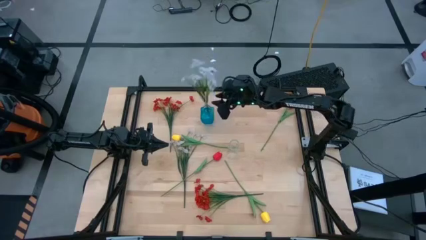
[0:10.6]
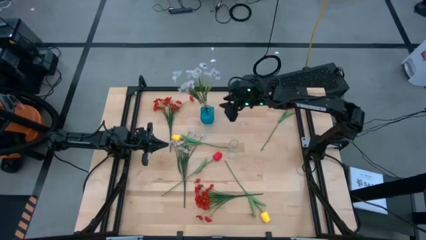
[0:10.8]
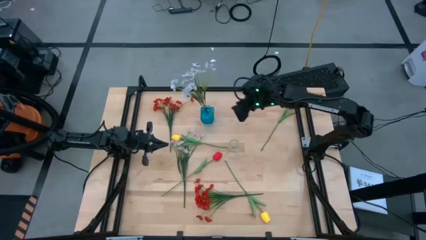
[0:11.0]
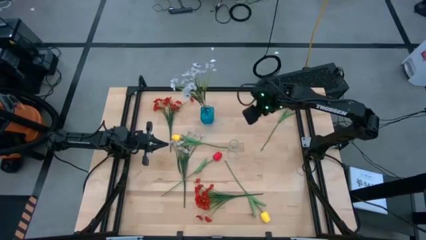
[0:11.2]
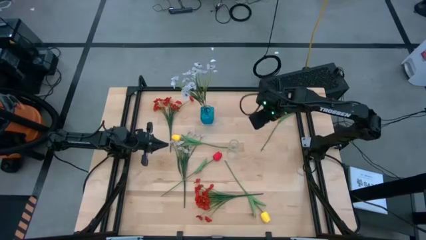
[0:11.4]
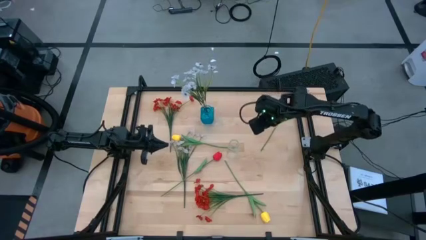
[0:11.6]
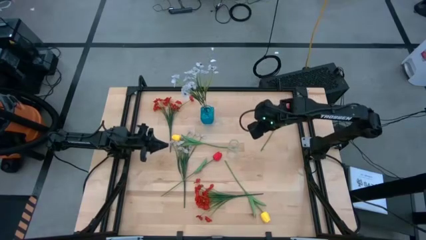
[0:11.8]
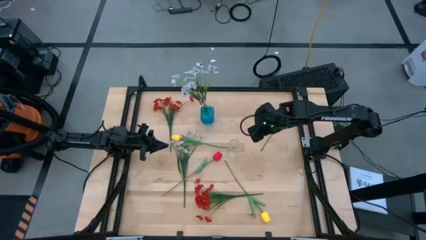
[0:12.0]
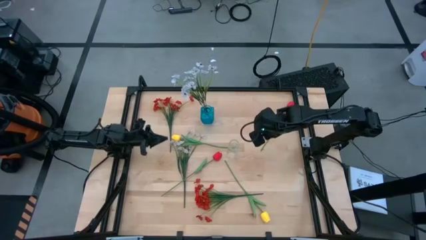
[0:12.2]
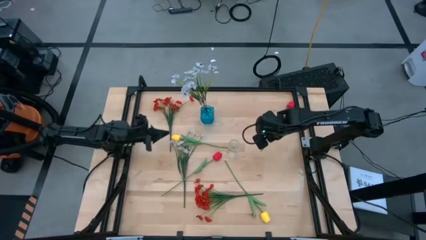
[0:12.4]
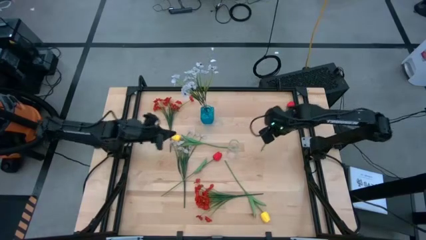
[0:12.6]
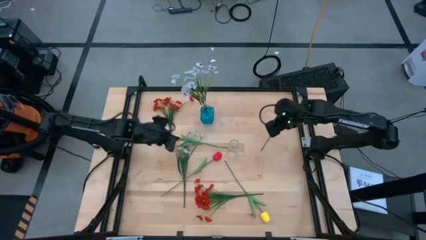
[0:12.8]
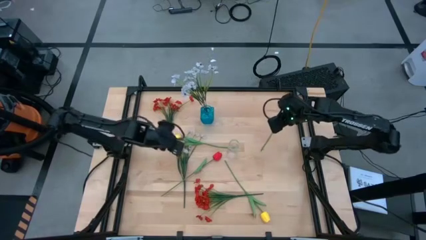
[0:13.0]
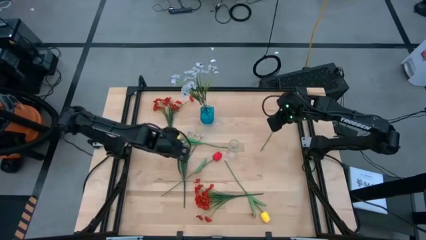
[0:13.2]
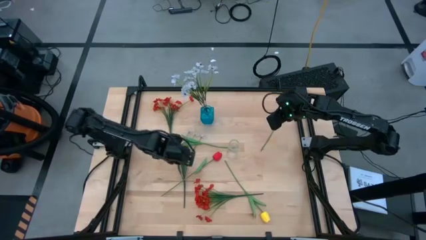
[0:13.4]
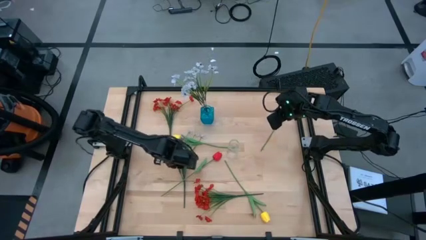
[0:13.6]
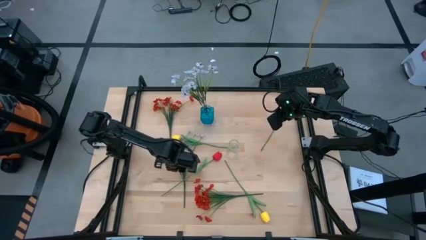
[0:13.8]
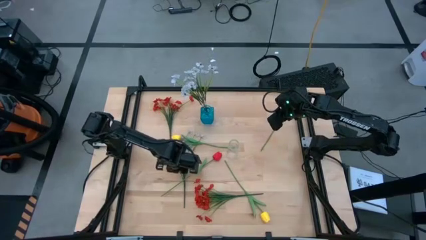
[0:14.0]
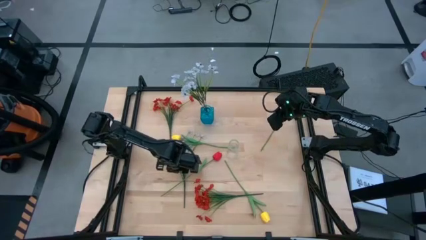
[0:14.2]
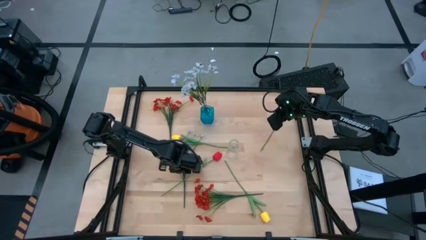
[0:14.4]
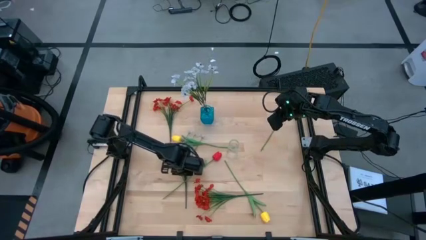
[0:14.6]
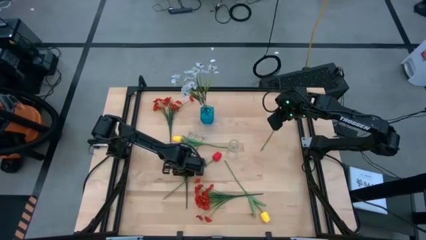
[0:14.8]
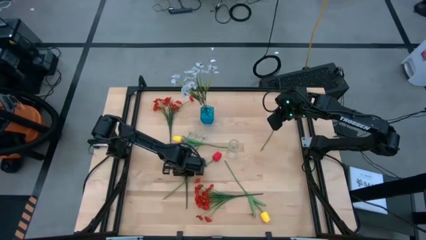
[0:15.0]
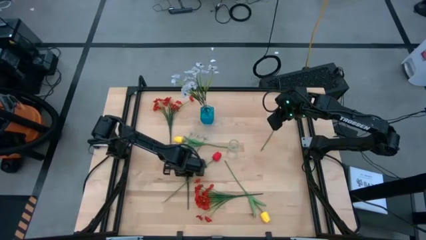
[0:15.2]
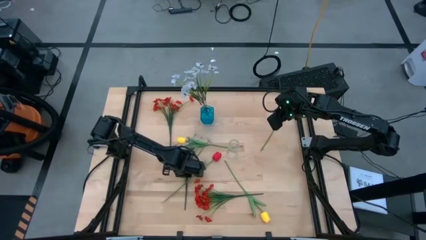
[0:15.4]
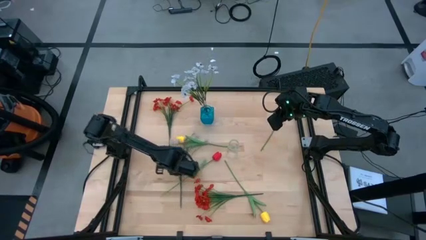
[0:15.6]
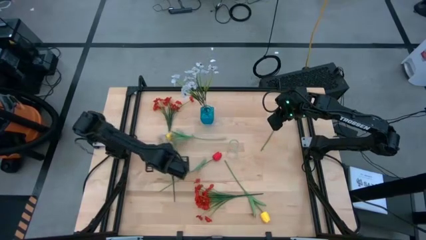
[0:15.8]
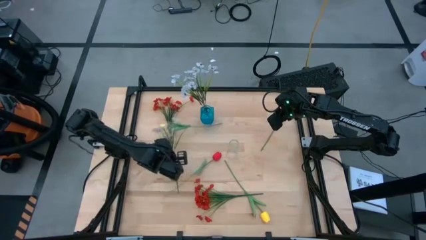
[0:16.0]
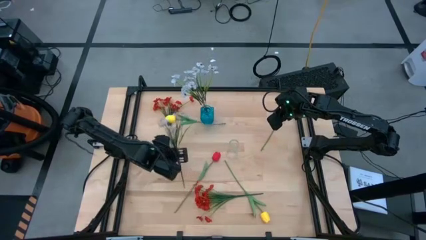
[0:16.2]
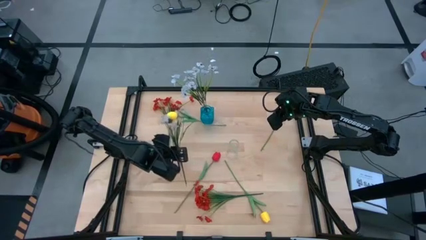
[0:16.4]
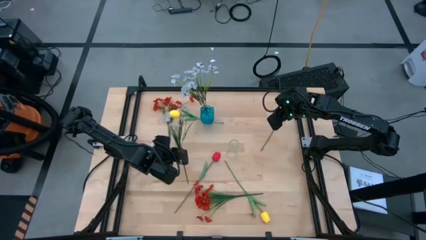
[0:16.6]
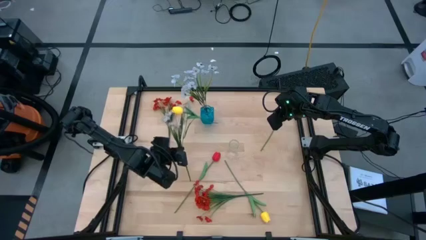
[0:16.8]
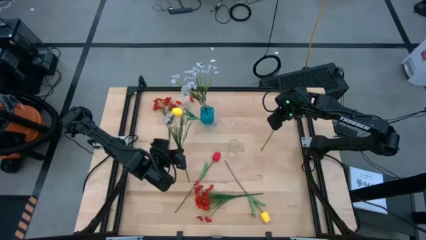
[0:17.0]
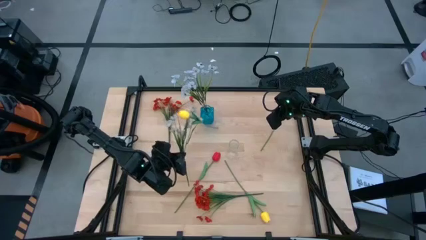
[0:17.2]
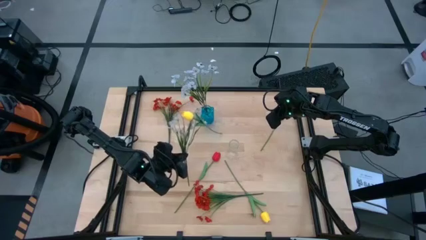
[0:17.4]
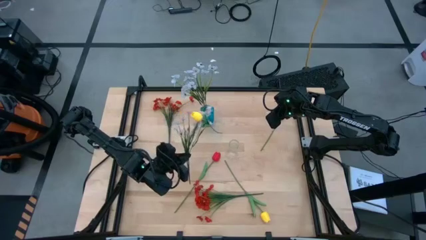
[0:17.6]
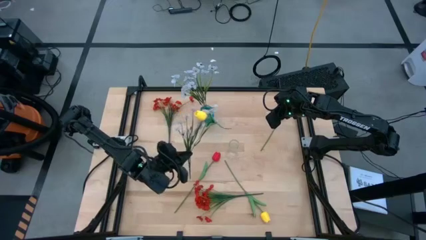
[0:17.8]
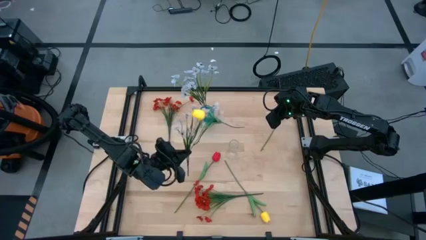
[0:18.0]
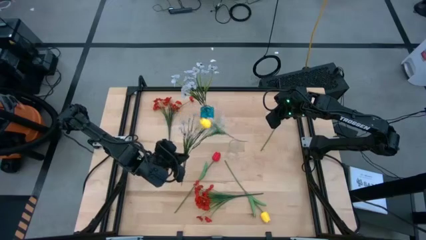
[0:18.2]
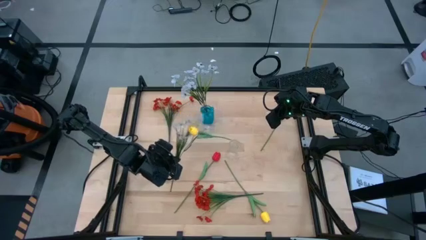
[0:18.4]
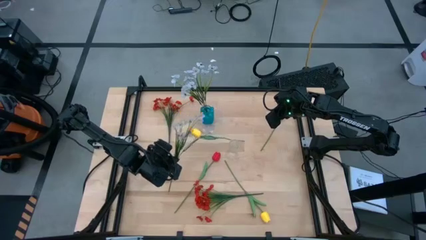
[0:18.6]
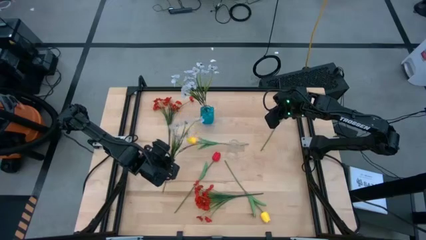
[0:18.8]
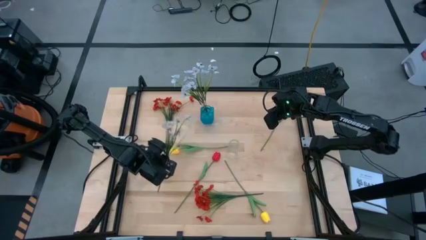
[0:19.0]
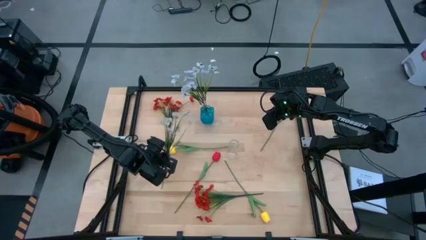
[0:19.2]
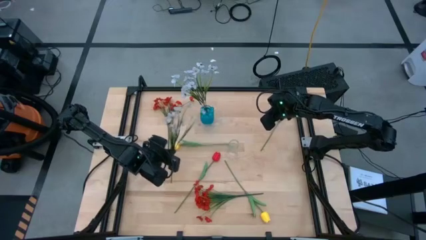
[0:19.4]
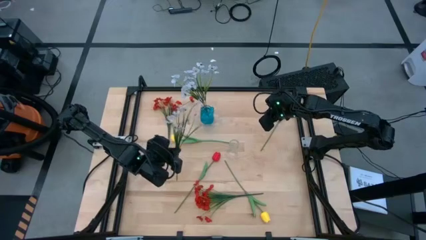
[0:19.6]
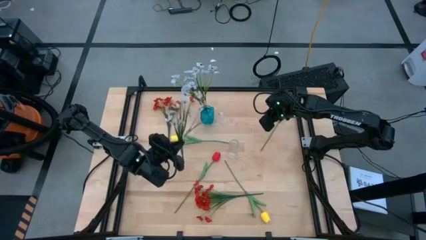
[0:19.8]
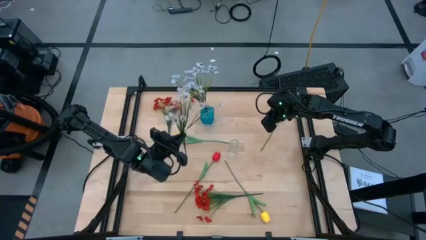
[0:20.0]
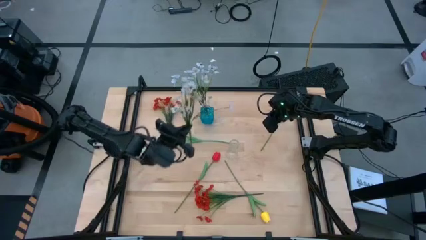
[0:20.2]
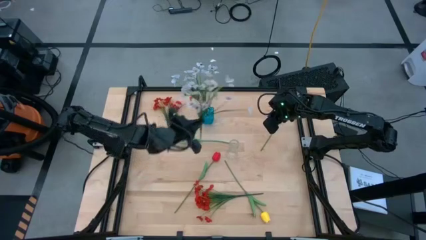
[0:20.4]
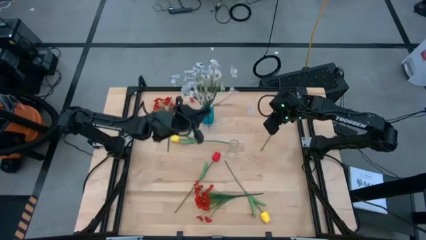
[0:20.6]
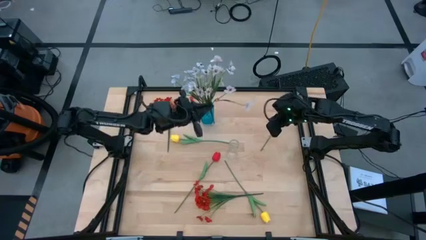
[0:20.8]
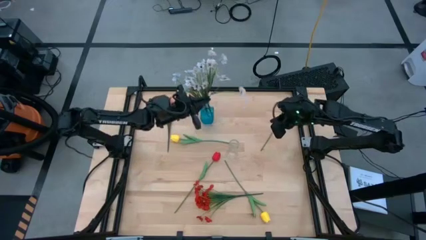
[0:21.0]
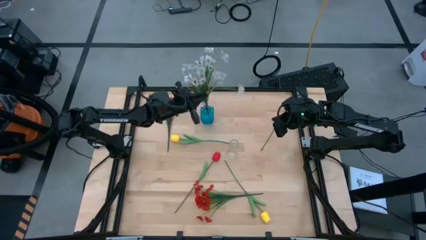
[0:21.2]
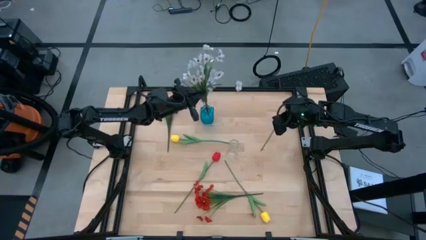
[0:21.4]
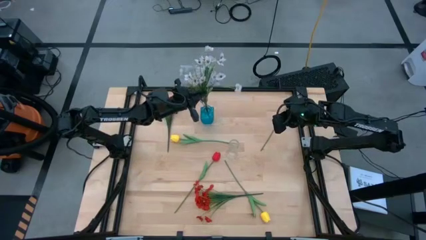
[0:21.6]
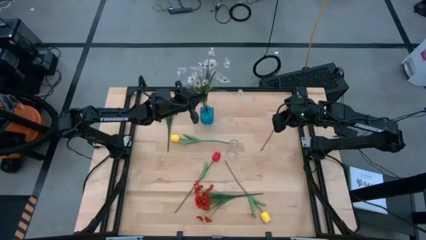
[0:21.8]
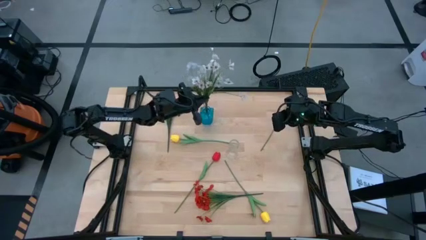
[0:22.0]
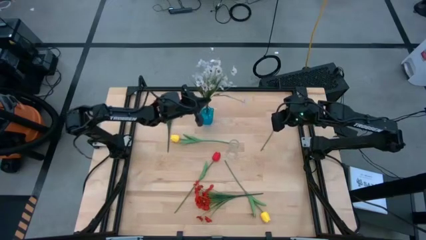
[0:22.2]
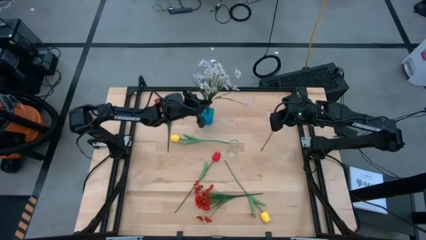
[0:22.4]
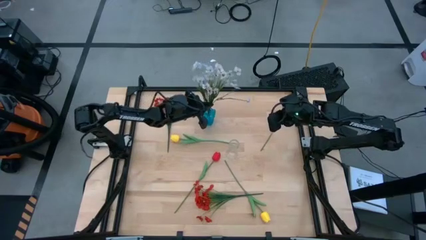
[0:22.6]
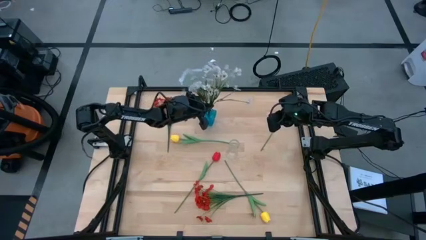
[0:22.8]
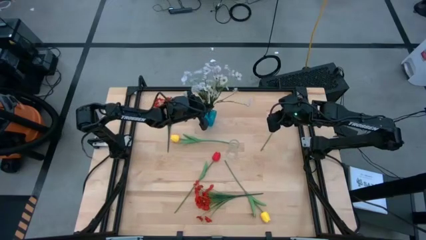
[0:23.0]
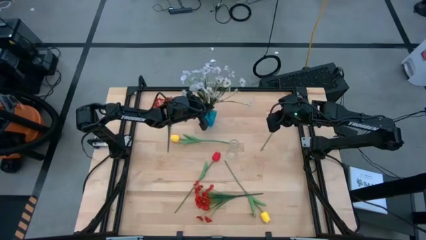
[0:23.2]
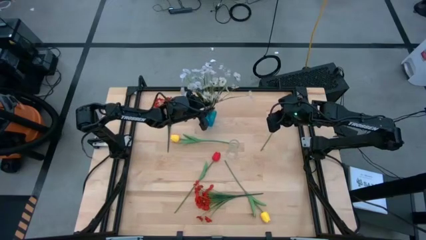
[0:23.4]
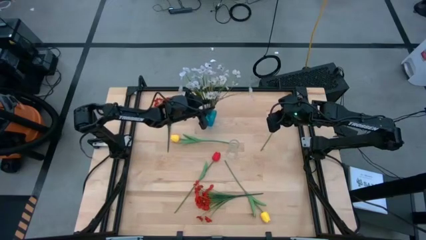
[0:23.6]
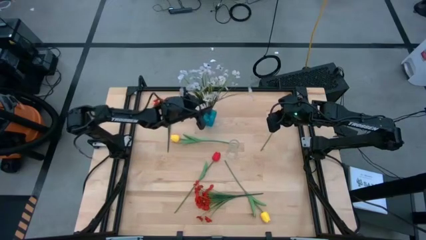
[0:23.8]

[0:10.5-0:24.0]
Task: Sort flowers into vase by color
Put the white flowers into the blue vase
